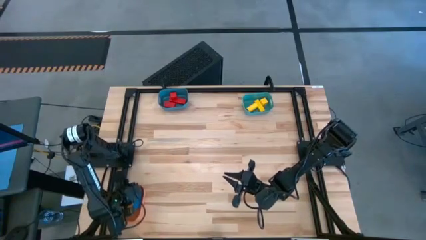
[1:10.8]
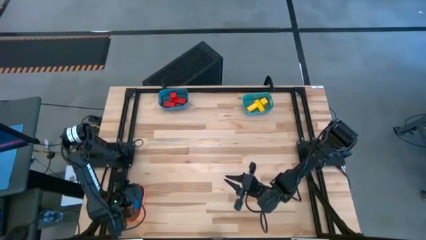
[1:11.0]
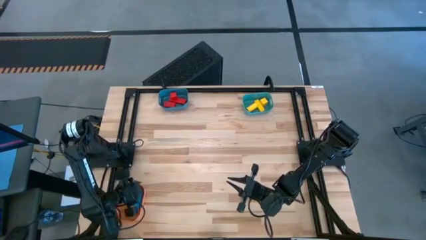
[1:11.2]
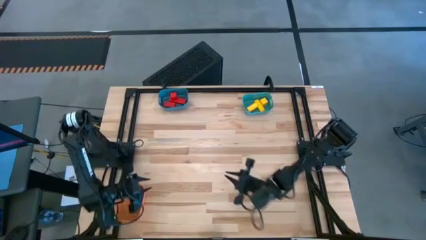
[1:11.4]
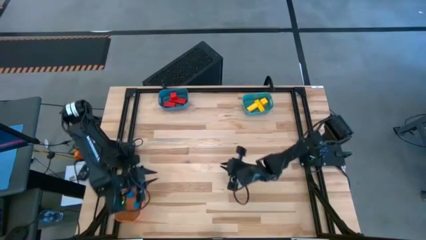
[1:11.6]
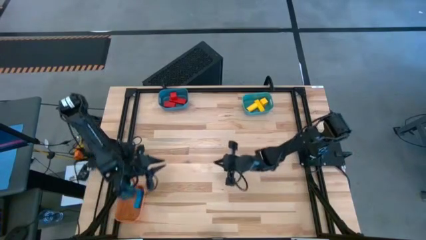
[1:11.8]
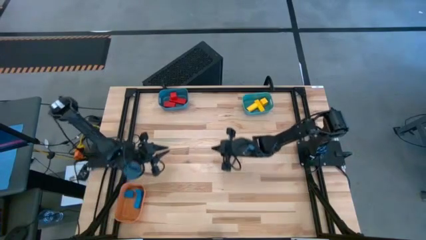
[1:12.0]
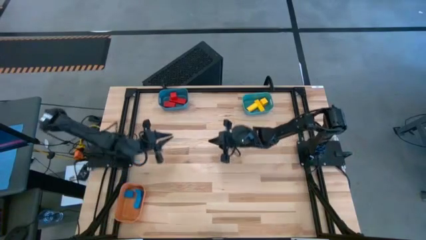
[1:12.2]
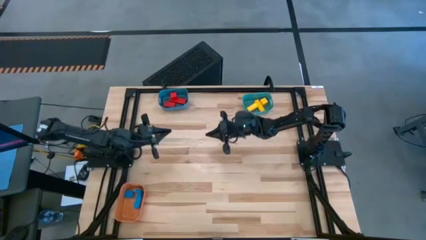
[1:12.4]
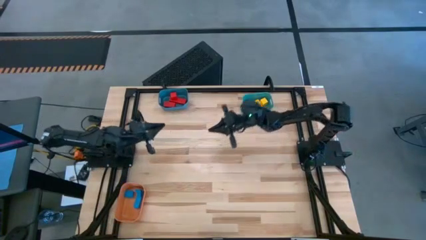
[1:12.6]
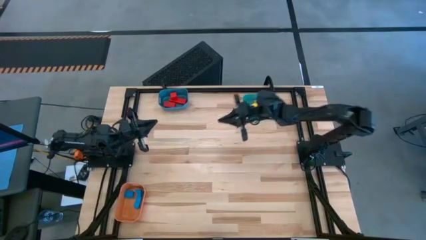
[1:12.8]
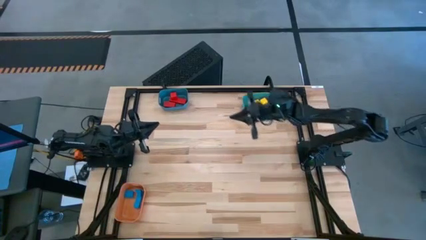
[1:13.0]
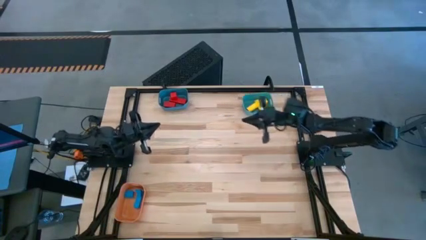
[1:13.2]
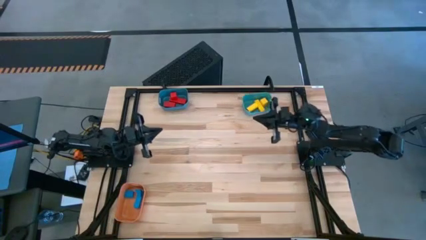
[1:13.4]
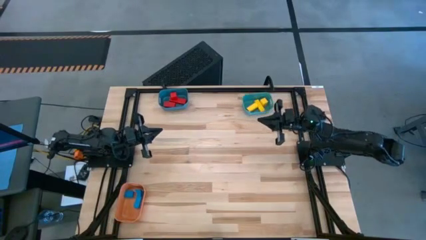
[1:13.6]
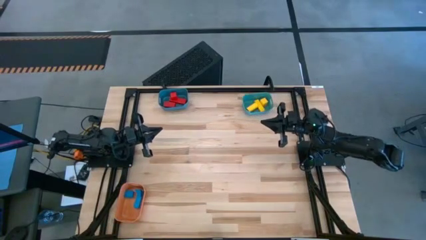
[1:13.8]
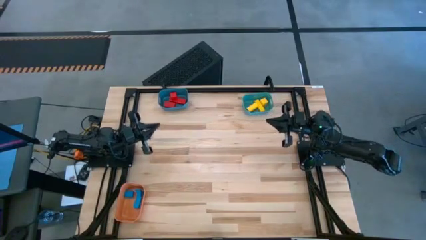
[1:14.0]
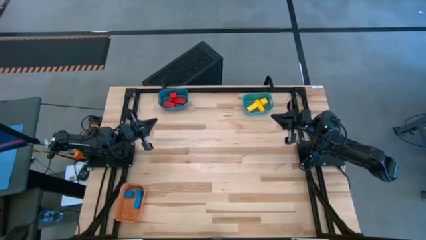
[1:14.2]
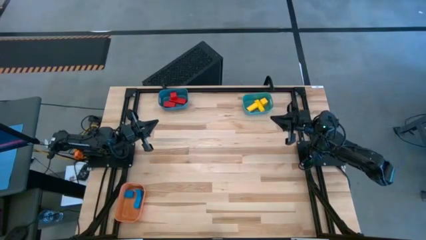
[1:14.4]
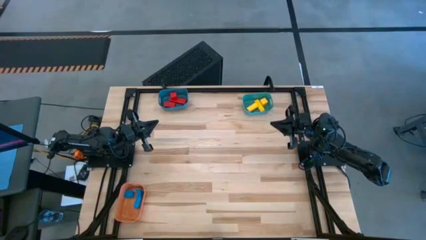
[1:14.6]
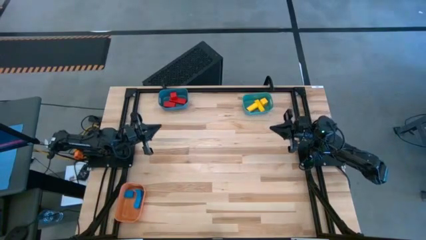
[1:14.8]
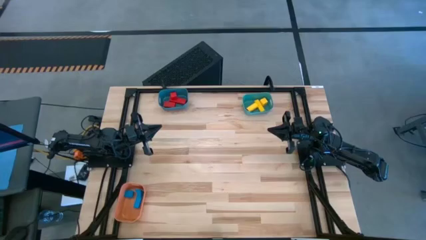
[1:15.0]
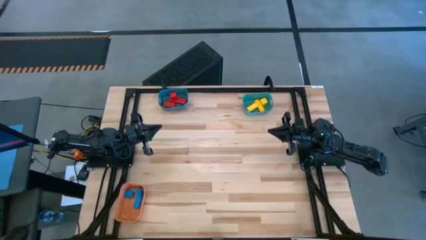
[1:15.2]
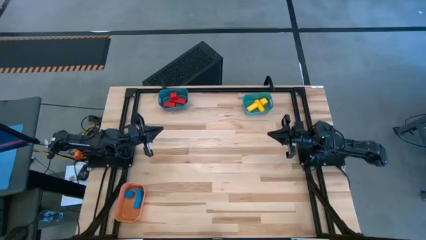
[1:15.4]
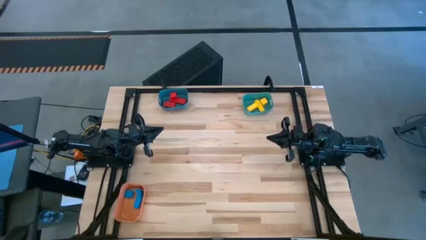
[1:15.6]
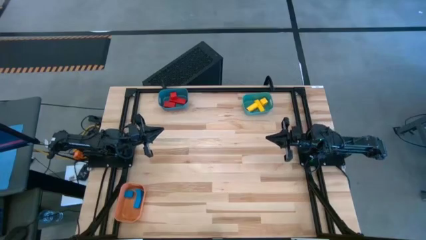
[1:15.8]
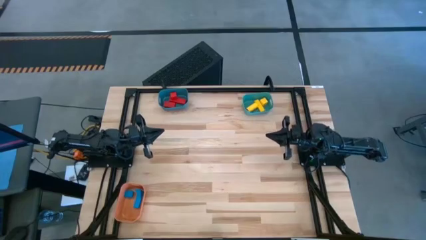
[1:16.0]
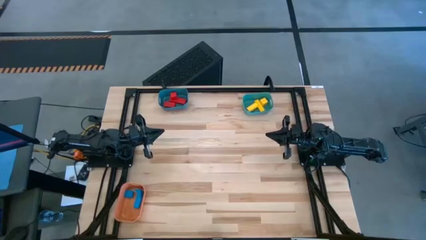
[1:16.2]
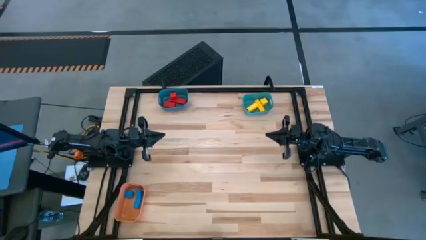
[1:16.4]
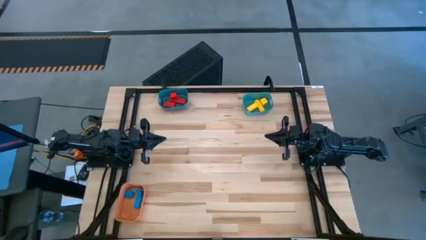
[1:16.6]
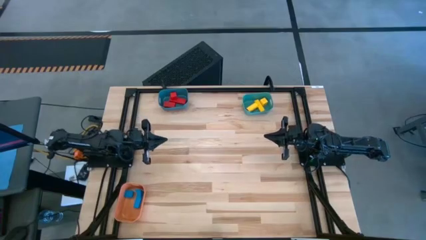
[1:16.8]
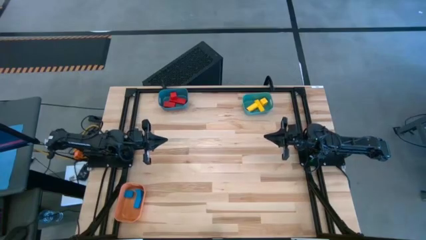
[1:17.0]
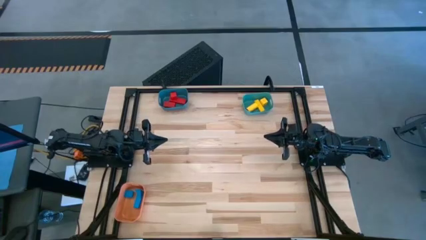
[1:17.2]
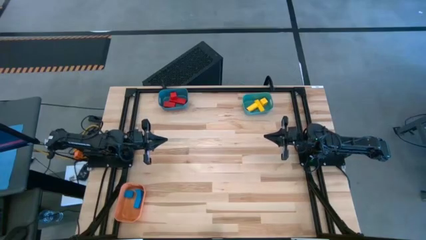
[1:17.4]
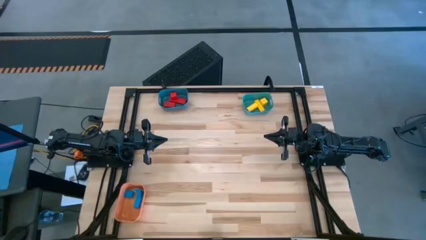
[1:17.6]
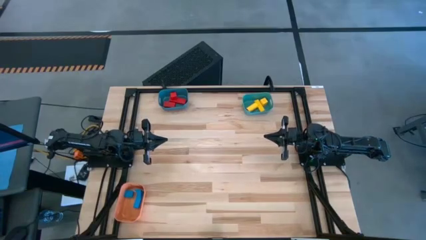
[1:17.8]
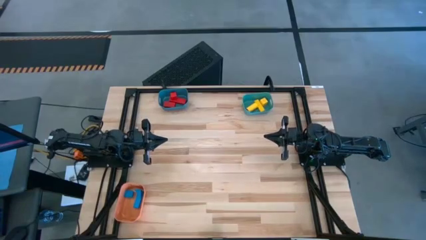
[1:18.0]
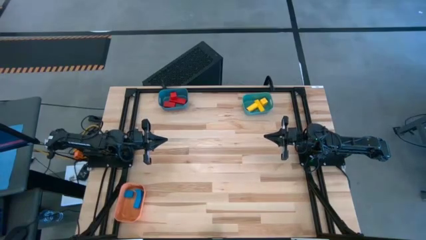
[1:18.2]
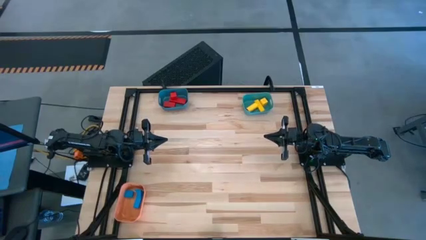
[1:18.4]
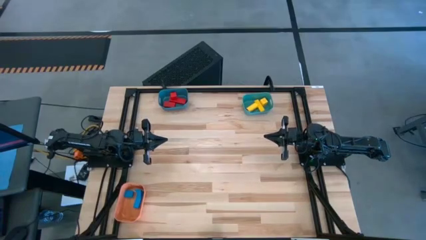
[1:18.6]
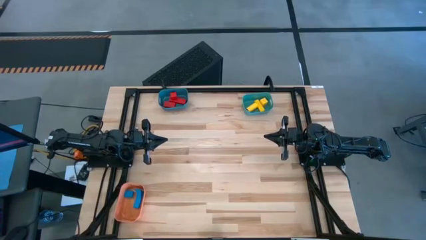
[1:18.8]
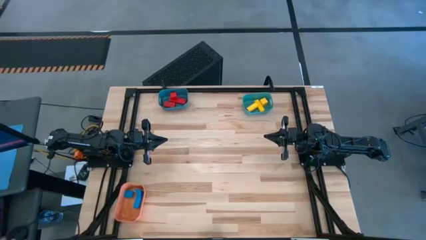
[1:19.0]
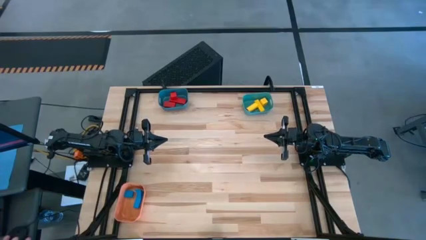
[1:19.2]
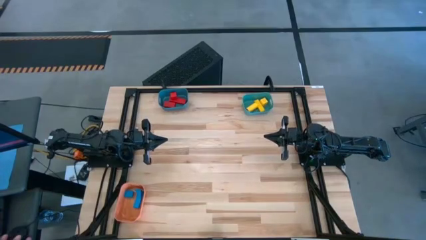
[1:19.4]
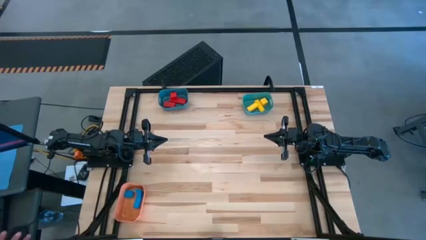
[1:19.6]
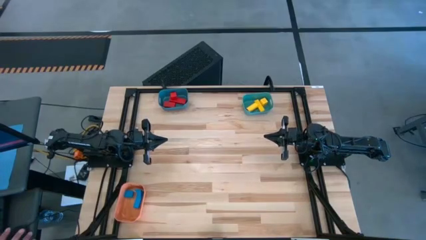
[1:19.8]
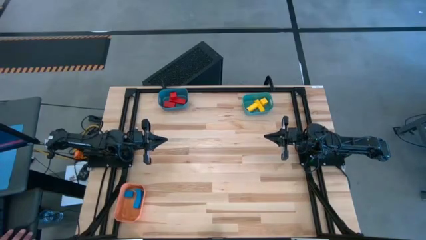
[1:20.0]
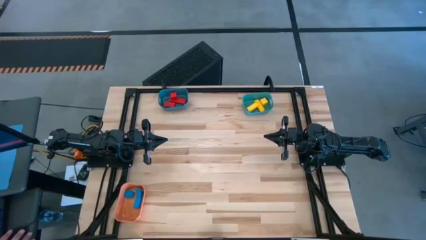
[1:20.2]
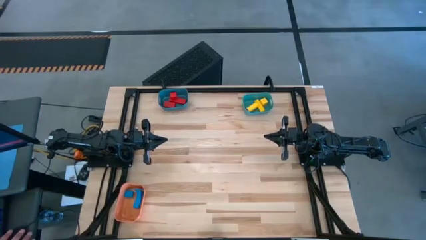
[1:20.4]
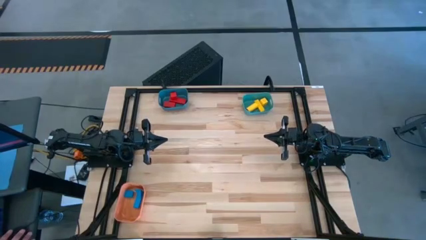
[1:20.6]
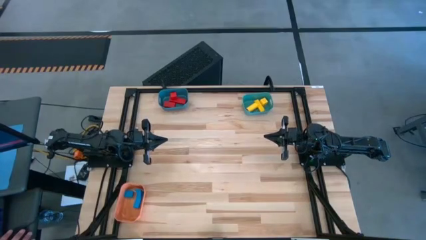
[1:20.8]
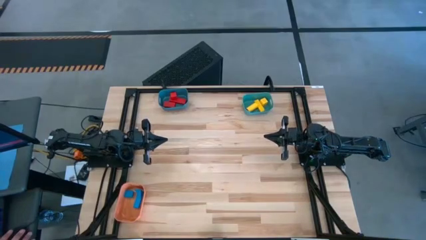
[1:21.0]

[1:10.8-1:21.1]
Task: Sort & place blocks by color
Return to Home Position

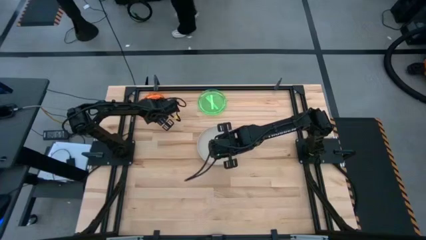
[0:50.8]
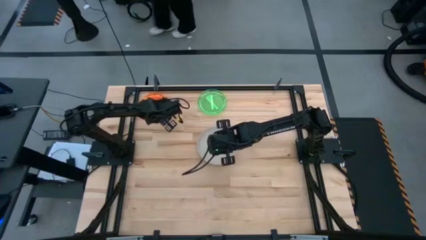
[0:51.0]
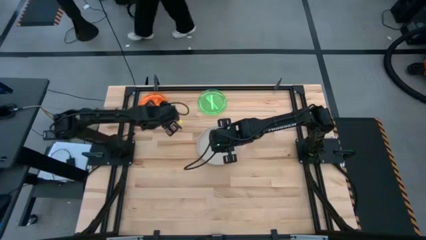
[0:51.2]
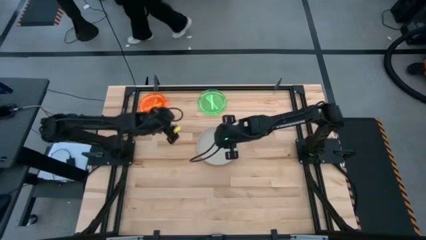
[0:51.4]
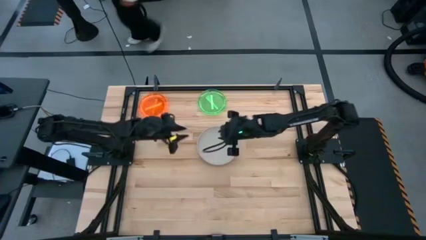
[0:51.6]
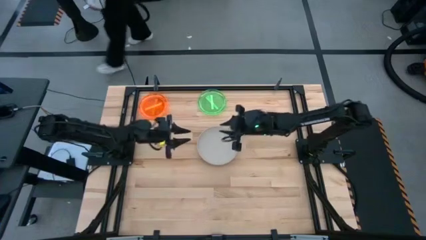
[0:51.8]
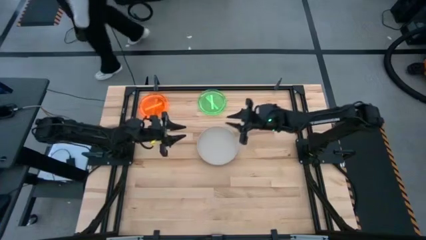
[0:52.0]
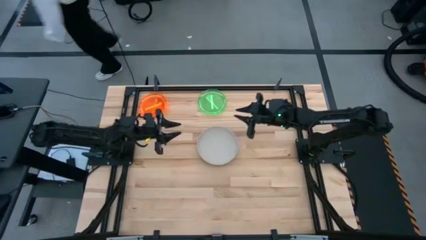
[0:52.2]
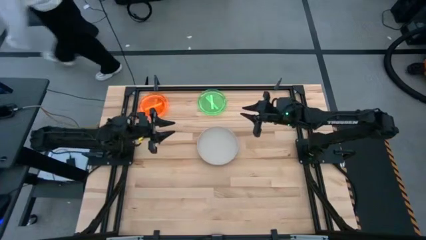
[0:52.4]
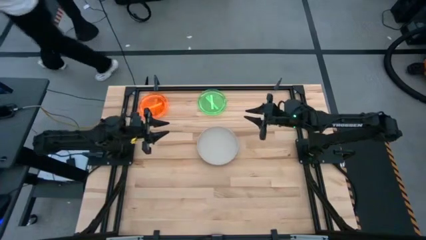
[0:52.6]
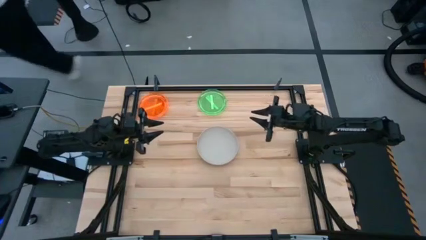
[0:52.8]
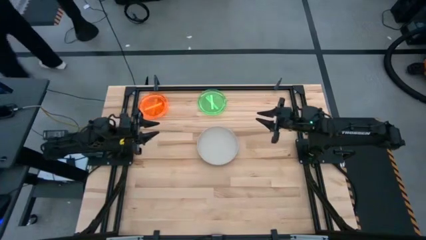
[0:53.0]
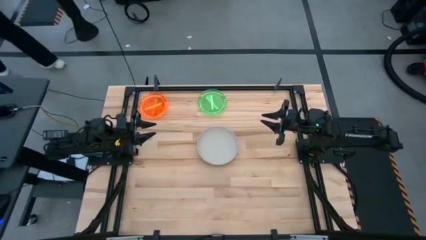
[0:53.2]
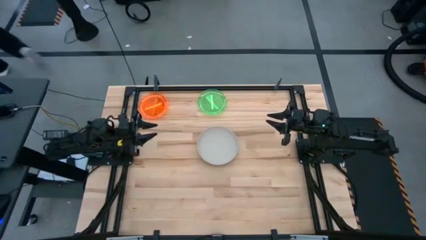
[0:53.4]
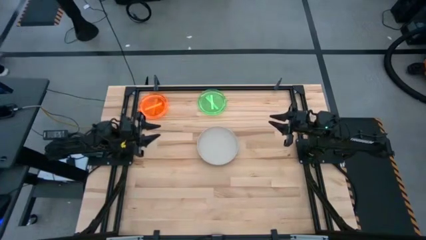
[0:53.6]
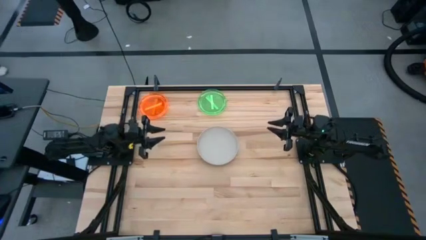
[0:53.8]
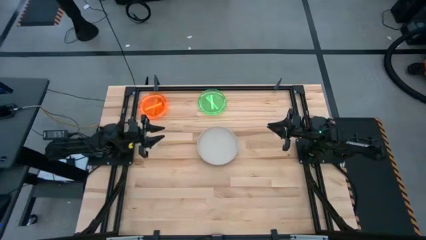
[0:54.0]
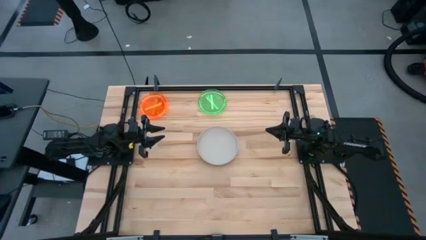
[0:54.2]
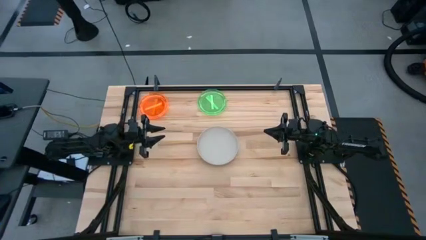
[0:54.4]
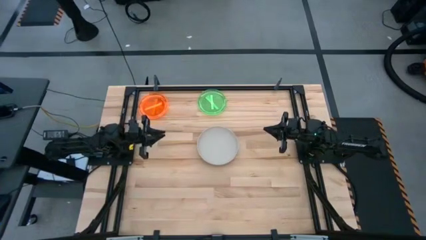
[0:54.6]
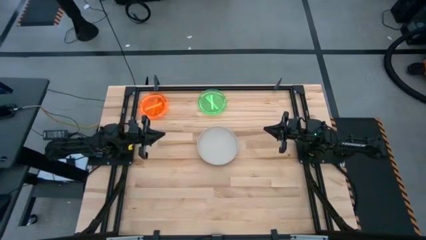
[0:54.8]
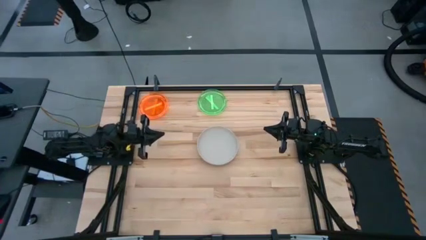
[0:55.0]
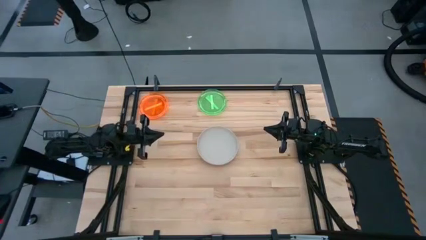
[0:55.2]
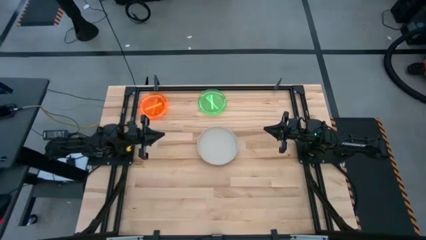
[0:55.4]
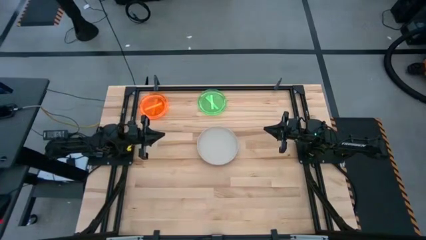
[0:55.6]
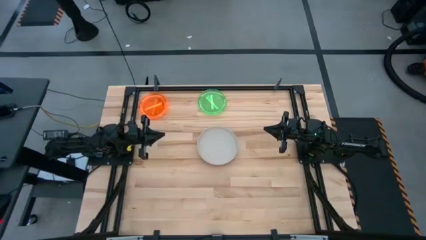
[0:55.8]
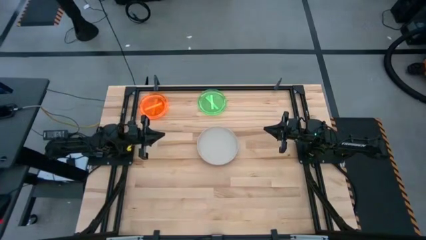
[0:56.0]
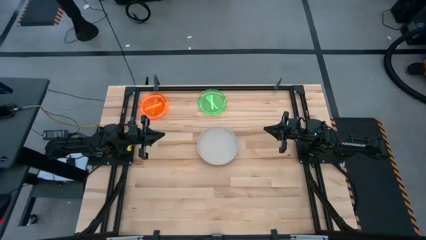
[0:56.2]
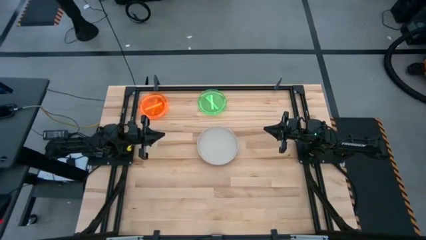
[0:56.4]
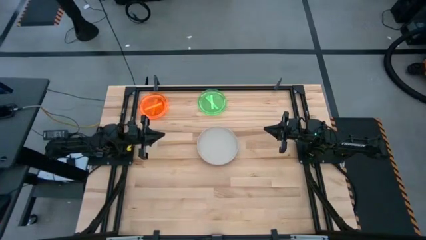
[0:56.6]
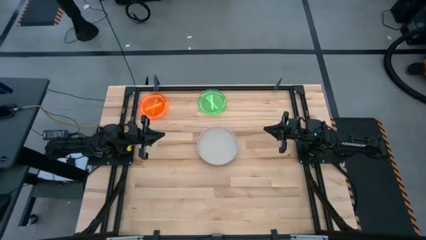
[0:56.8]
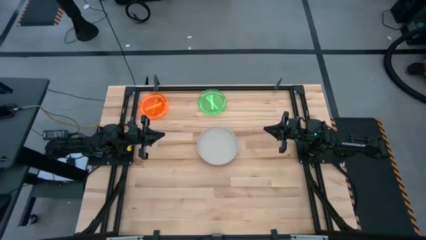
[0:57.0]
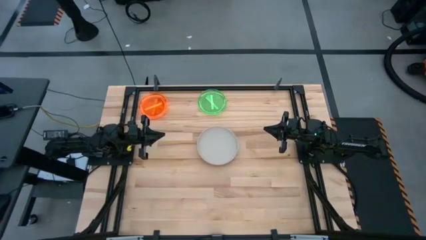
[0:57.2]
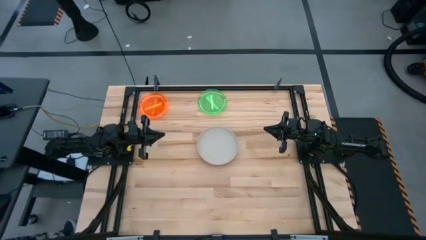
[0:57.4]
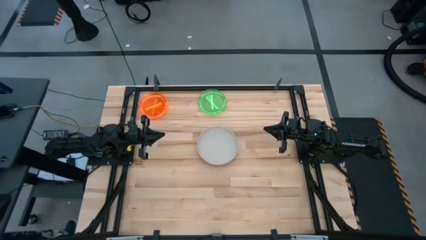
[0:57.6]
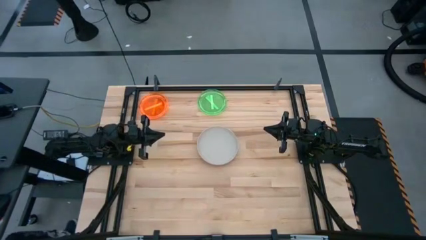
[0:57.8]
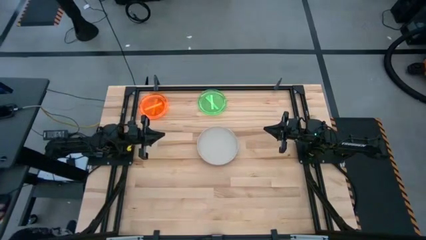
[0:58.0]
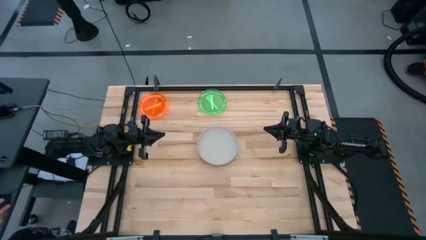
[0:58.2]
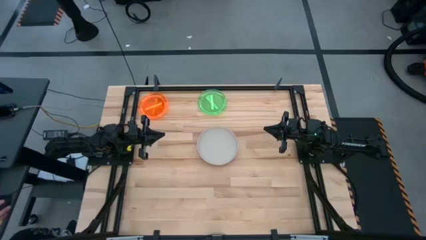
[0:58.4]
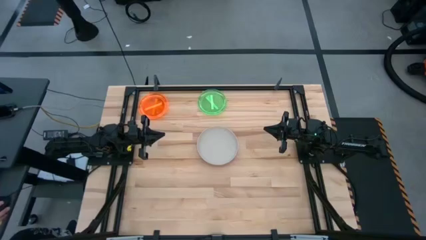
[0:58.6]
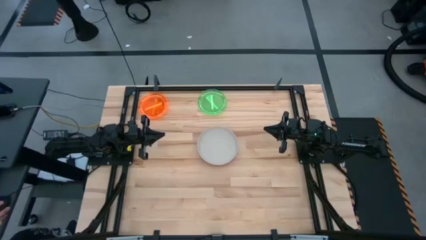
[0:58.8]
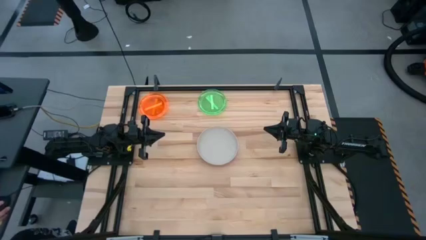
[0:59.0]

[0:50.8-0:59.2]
Task: Stack plastic plates
Return to Home Position
